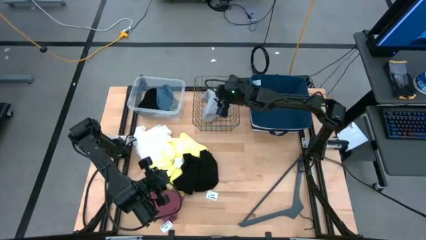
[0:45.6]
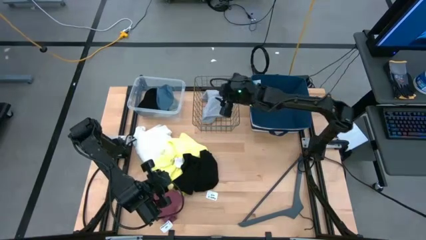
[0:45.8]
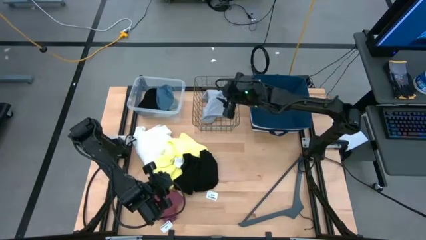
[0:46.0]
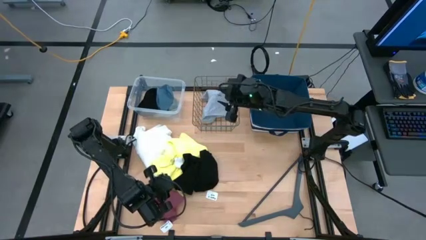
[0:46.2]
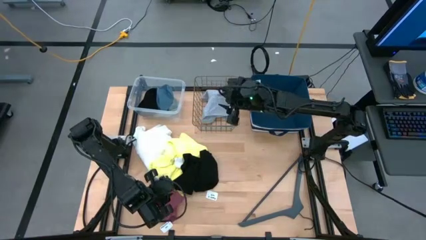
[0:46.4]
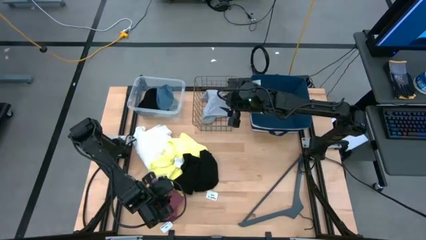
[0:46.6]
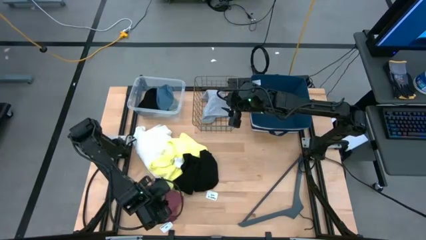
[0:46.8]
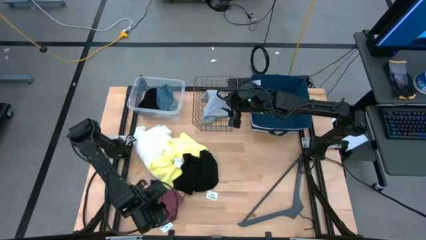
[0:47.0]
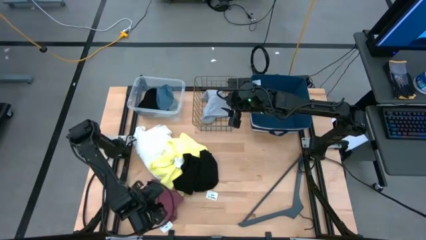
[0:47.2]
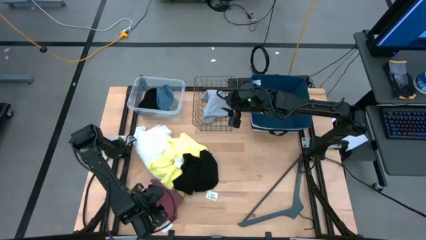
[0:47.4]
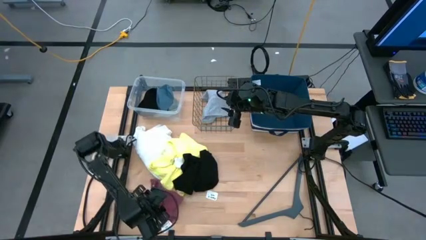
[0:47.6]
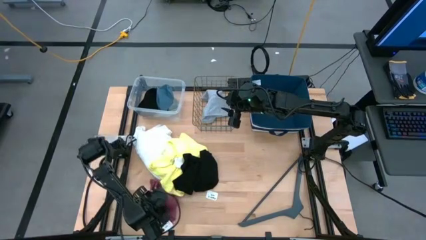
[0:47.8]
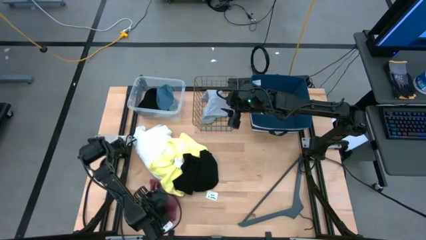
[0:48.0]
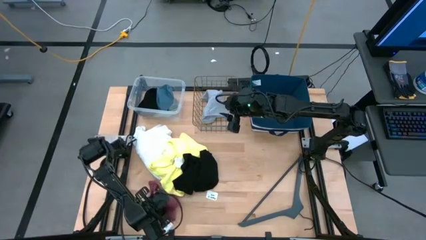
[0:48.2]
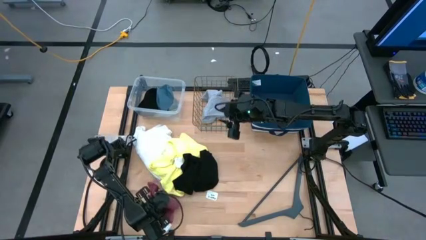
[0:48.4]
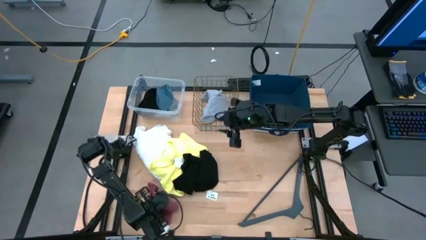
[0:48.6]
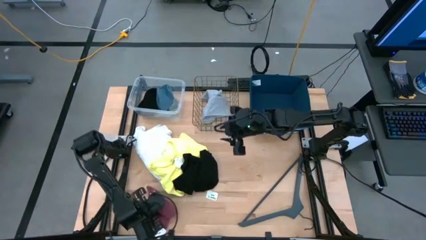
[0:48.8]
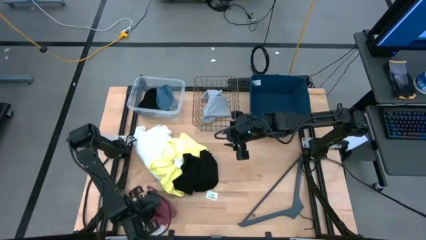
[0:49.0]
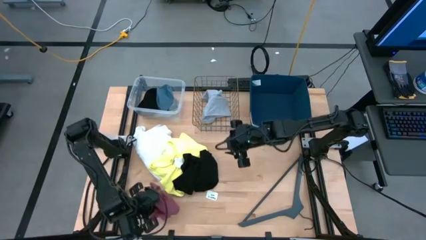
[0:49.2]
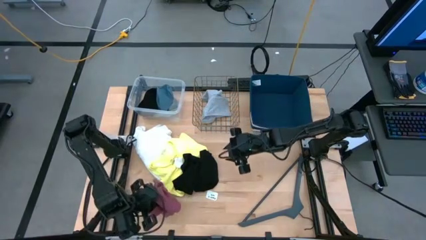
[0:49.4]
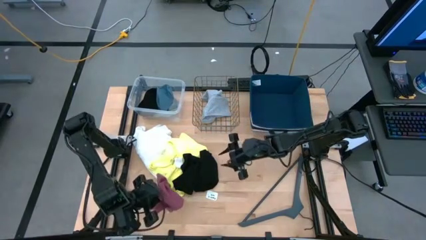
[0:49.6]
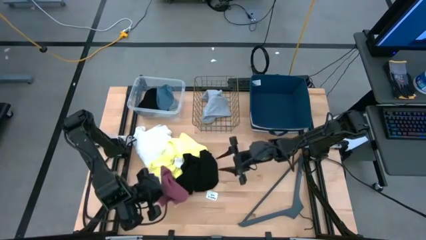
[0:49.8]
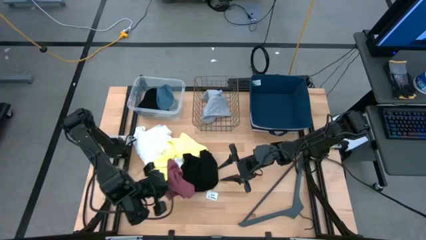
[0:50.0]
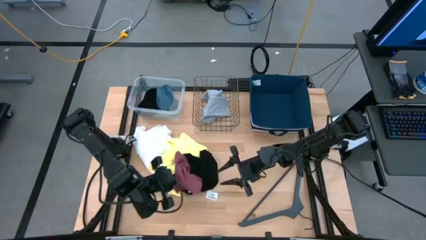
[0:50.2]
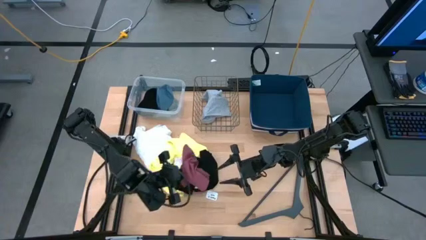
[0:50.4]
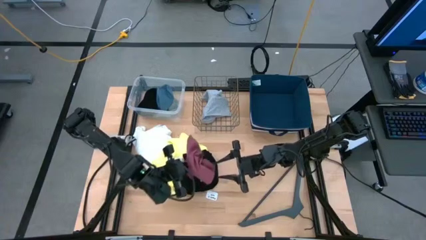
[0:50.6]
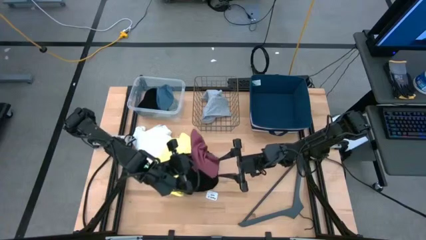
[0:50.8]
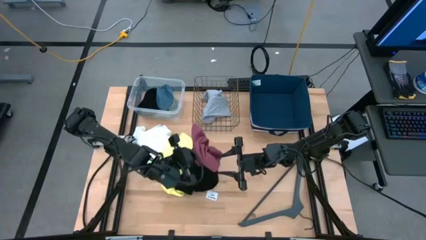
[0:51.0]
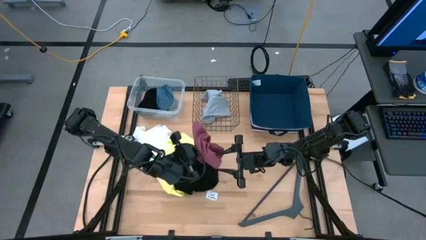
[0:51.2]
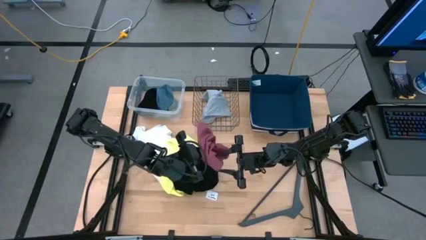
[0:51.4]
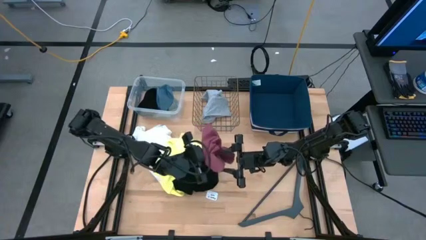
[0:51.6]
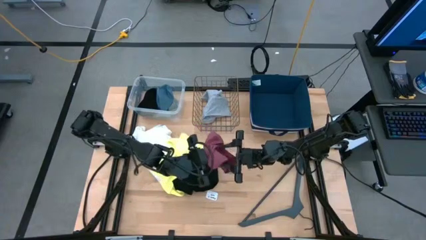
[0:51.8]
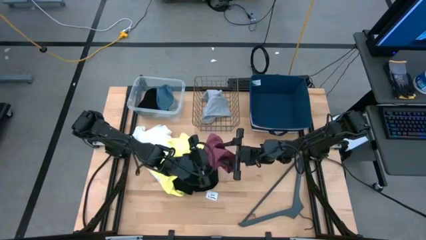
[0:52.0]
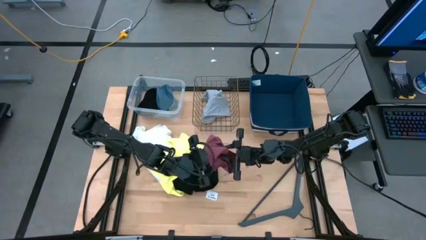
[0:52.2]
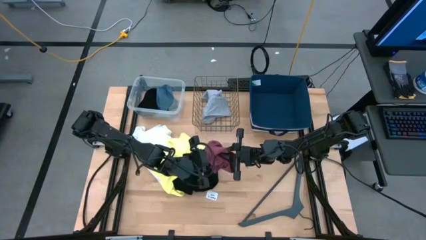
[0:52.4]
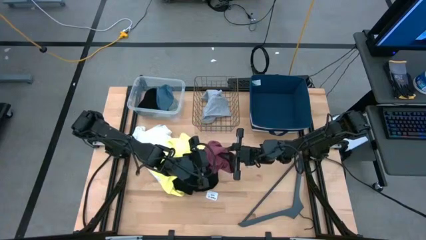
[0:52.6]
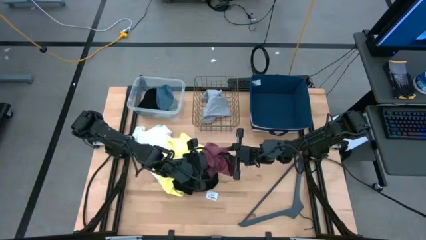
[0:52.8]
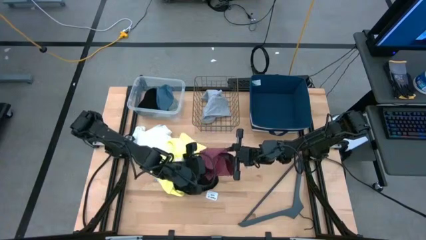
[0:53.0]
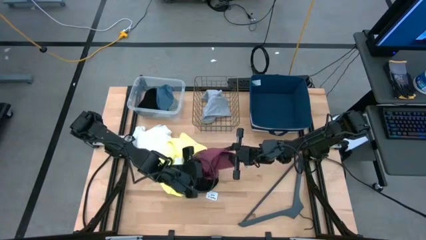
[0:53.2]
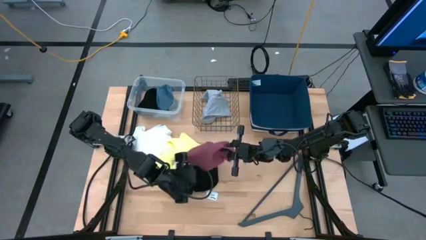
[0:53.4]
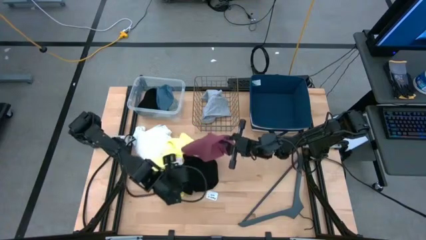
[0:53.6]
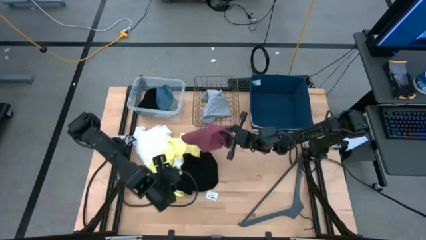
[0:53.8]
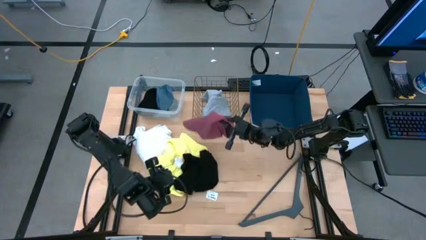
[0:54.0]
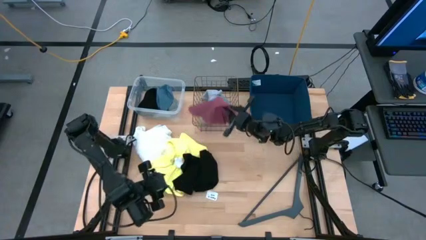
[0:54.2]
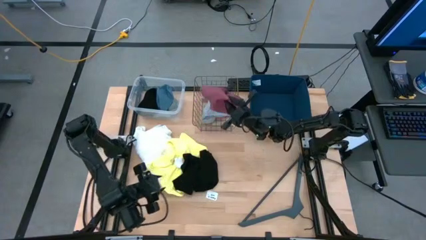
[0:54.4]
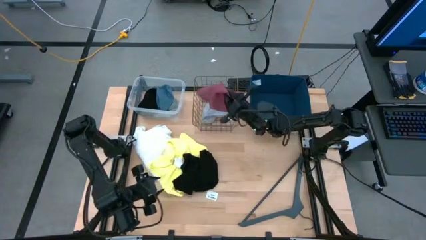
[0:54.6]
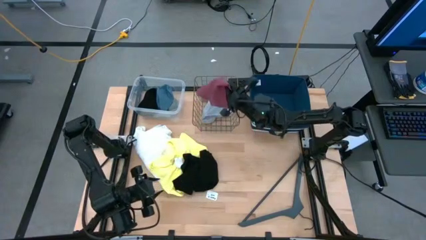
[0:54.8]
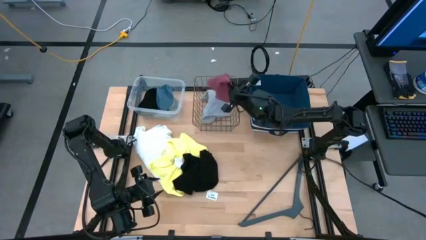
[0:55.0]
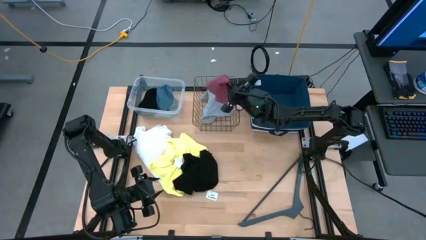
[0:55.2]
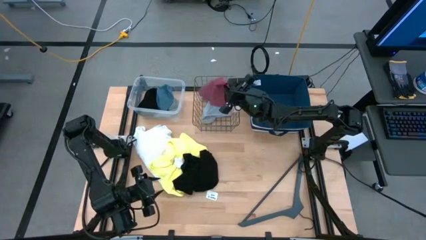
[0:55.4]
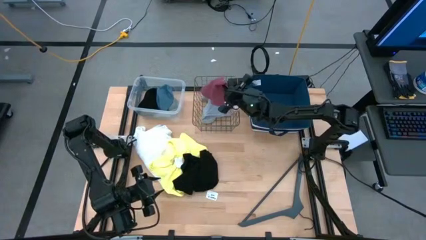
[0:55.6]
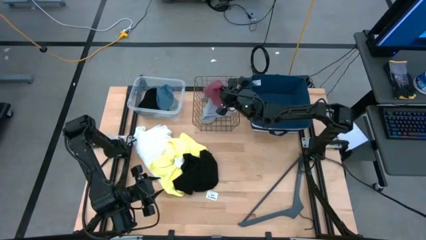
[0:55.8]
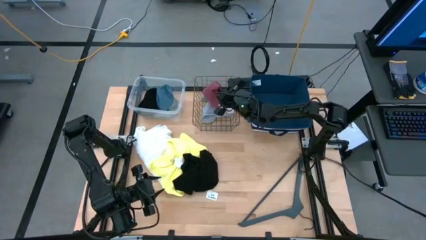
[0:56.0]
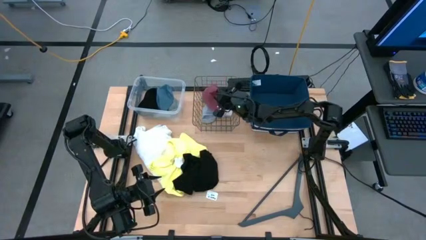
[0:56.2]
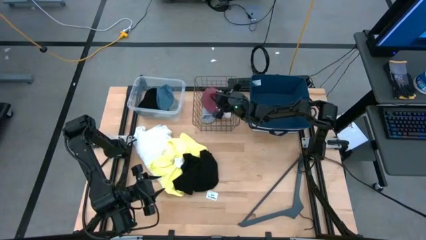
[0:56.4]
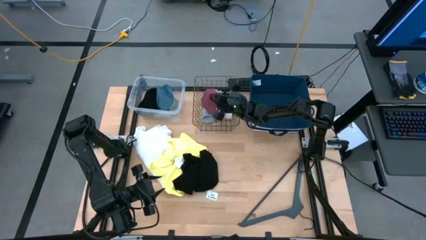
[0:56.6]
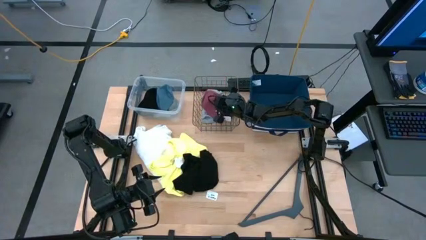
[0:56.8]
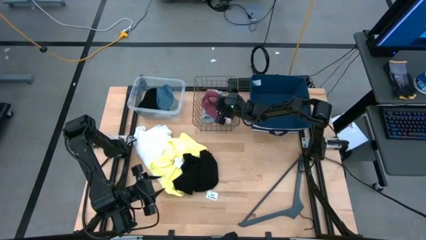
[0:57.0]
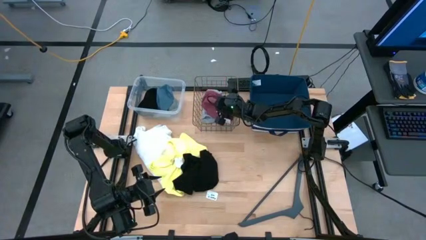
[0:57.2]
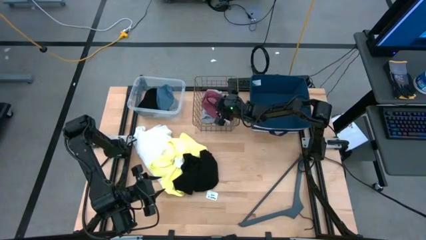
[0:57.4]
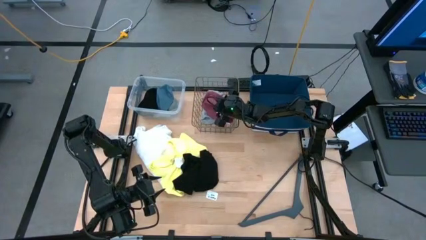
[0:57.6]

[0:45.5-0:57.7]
Task: Pick & Place Cloths
Put the pink boxer into the gold wire basket
